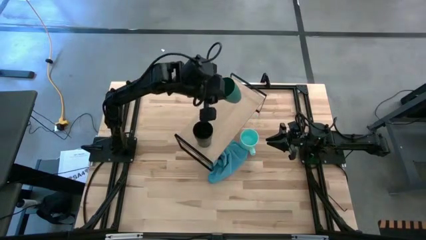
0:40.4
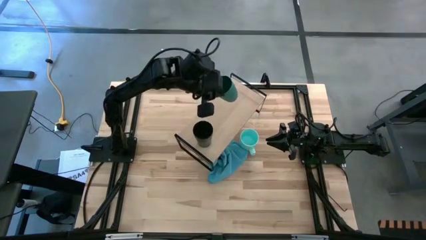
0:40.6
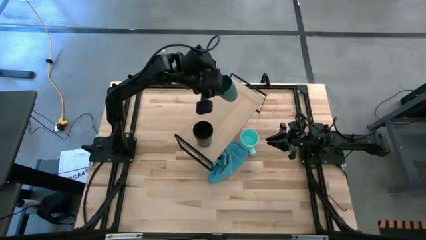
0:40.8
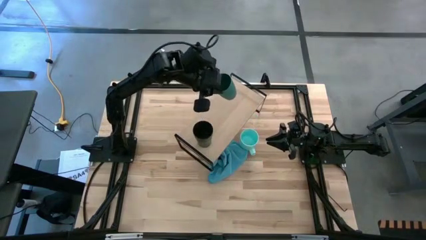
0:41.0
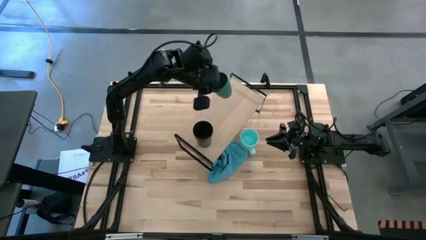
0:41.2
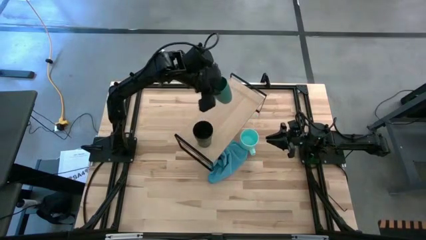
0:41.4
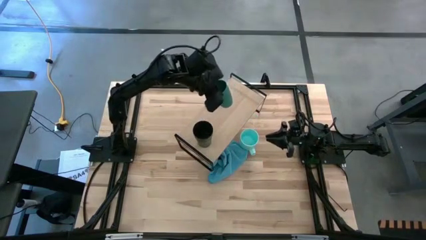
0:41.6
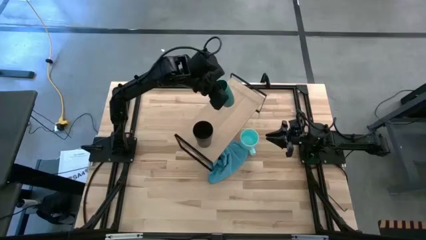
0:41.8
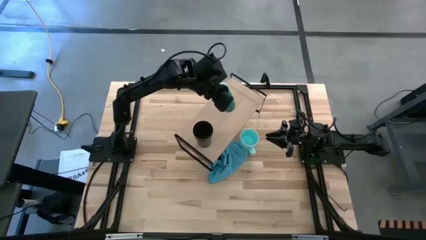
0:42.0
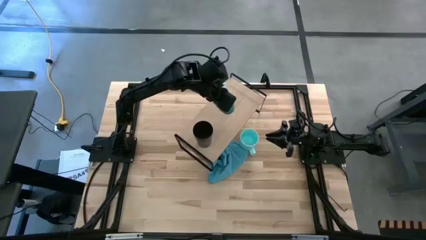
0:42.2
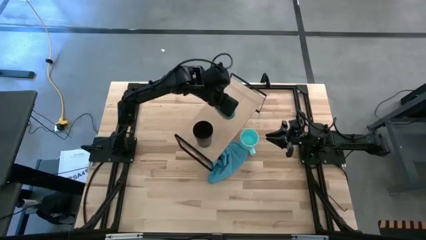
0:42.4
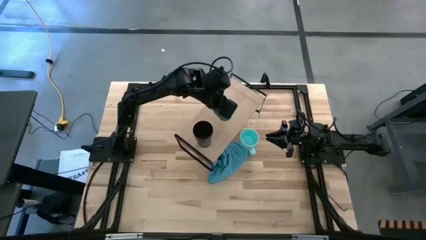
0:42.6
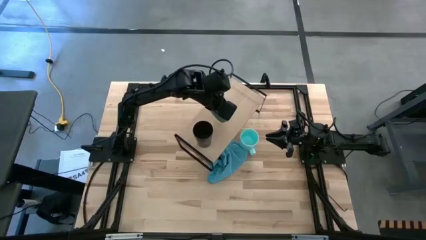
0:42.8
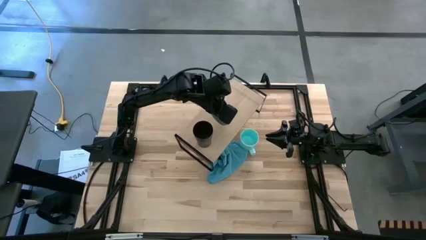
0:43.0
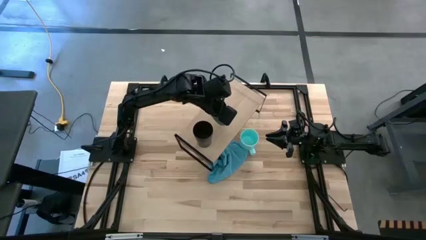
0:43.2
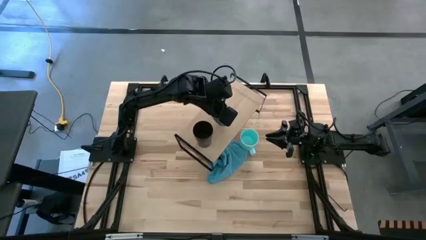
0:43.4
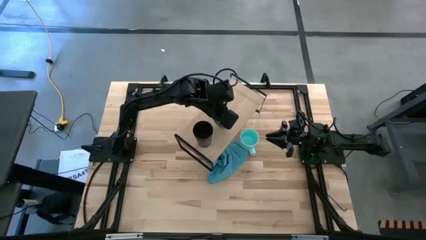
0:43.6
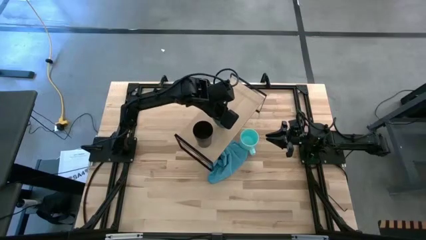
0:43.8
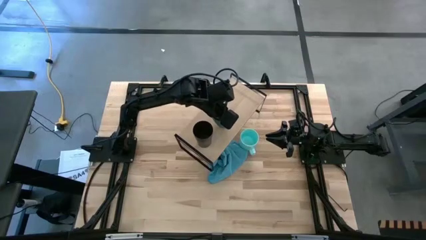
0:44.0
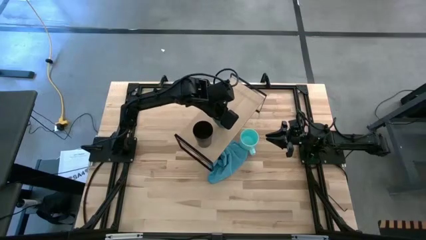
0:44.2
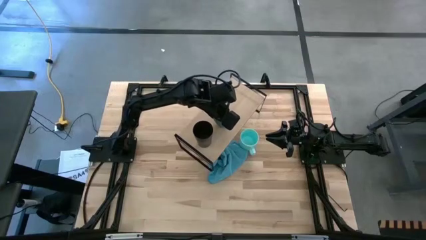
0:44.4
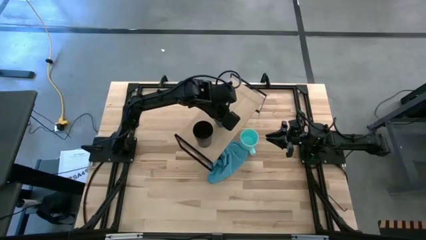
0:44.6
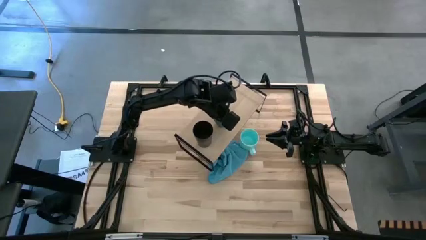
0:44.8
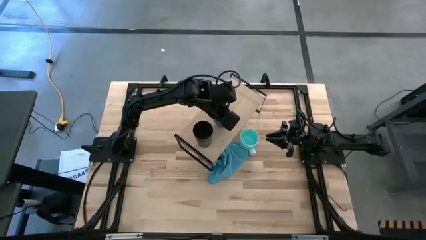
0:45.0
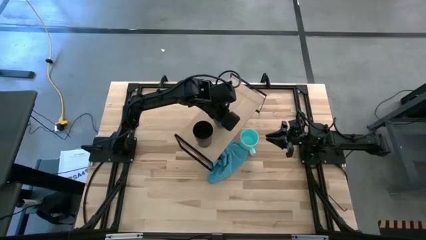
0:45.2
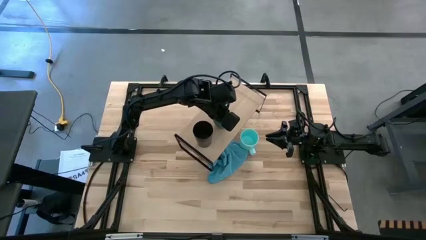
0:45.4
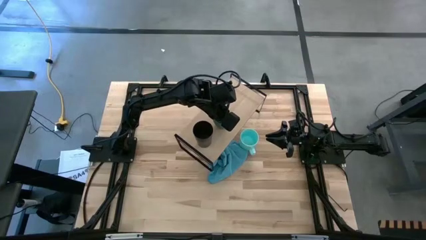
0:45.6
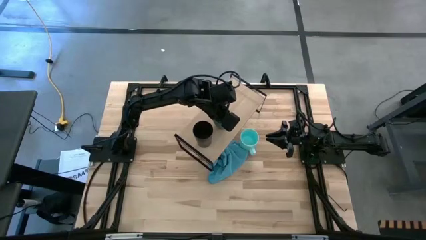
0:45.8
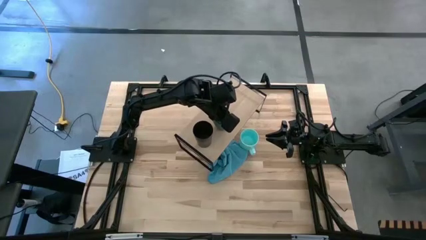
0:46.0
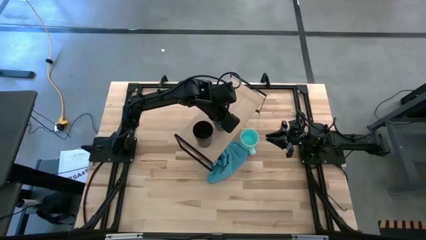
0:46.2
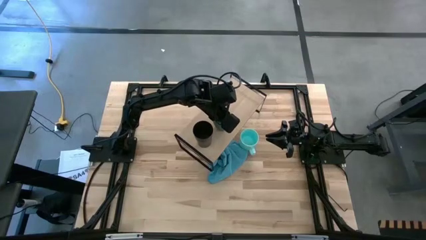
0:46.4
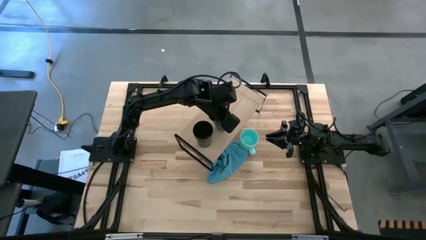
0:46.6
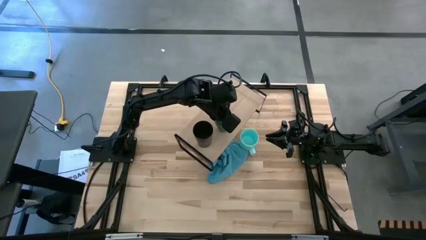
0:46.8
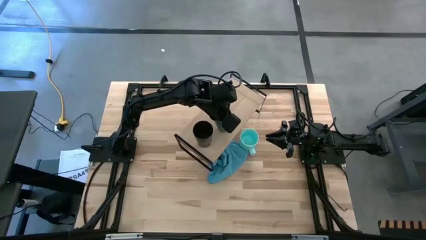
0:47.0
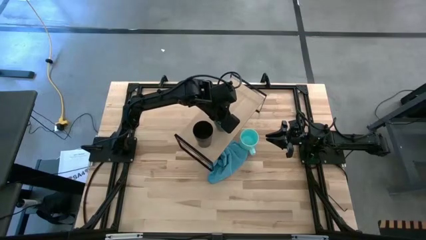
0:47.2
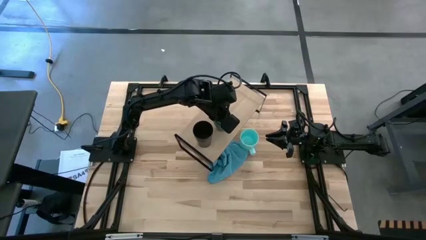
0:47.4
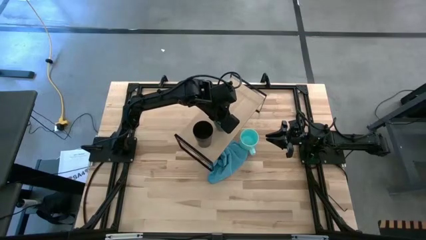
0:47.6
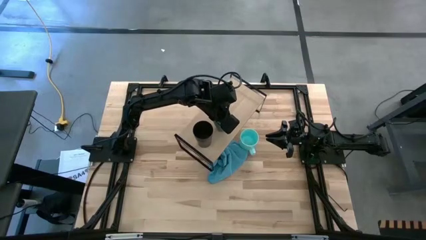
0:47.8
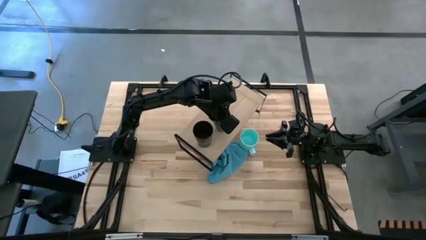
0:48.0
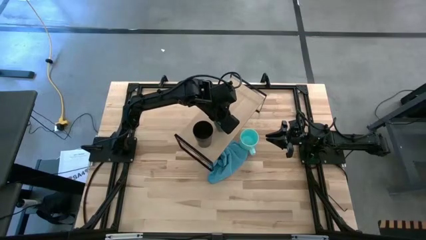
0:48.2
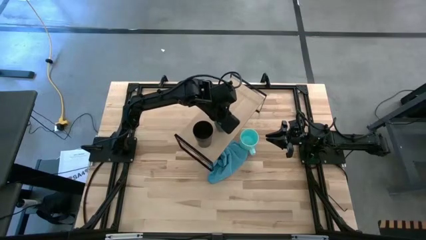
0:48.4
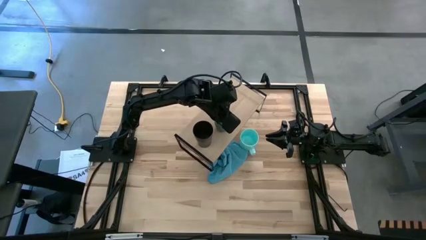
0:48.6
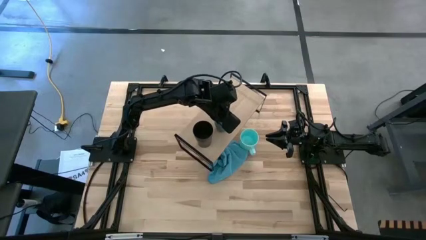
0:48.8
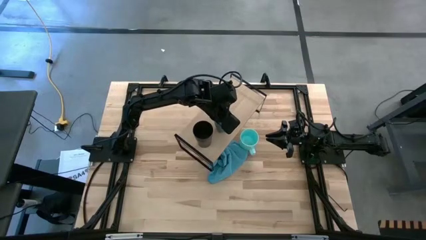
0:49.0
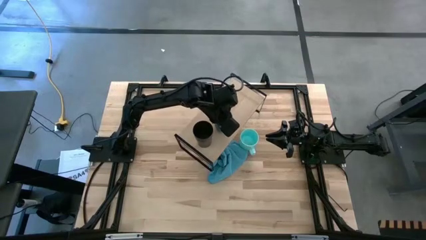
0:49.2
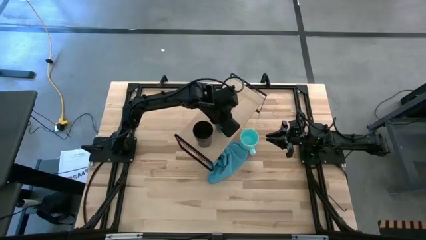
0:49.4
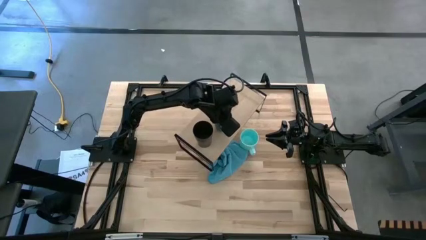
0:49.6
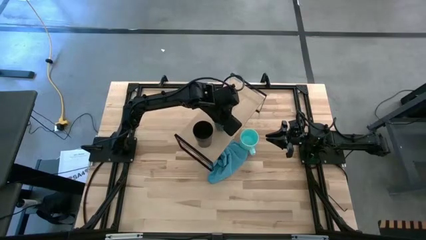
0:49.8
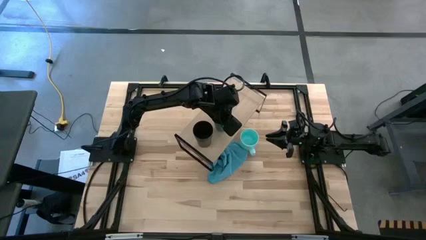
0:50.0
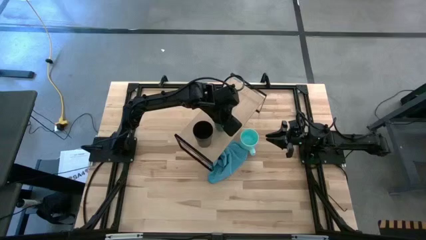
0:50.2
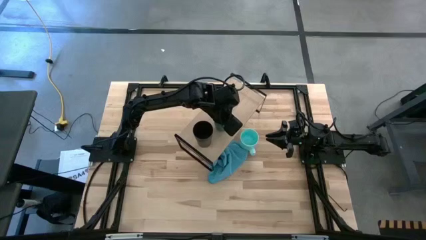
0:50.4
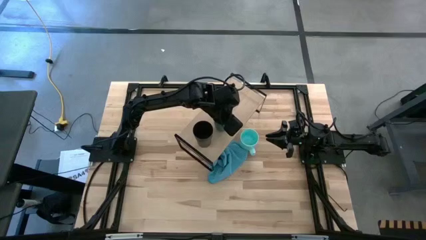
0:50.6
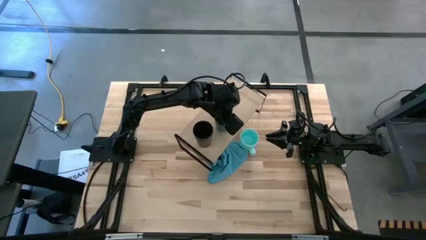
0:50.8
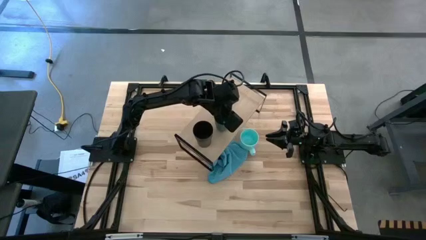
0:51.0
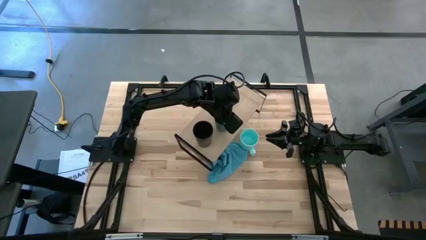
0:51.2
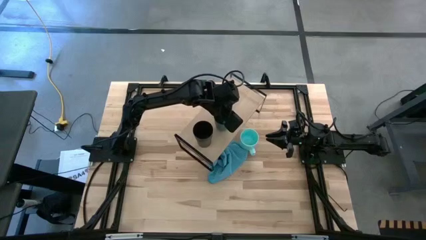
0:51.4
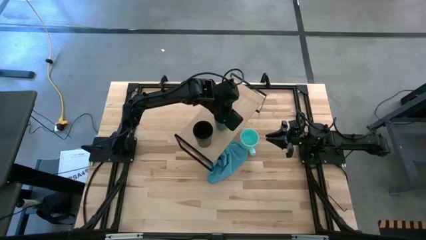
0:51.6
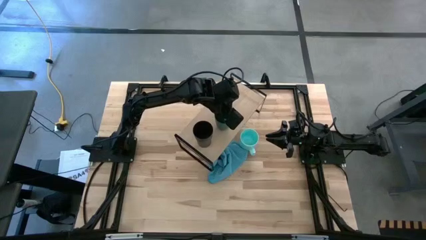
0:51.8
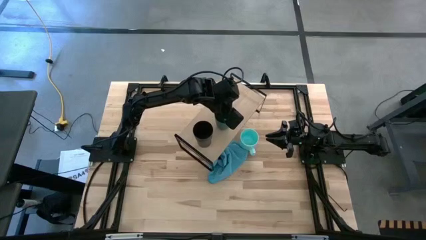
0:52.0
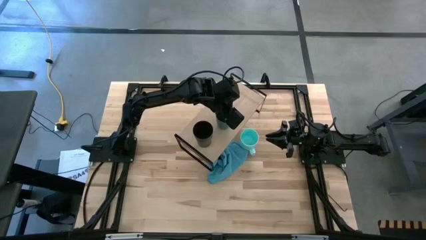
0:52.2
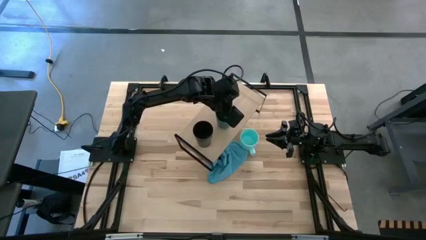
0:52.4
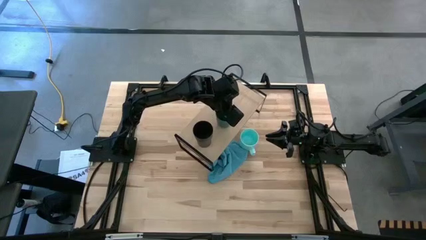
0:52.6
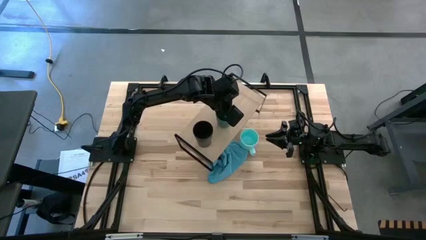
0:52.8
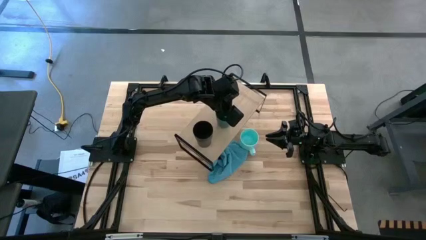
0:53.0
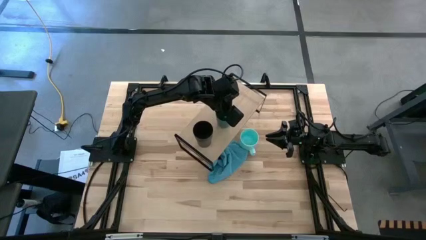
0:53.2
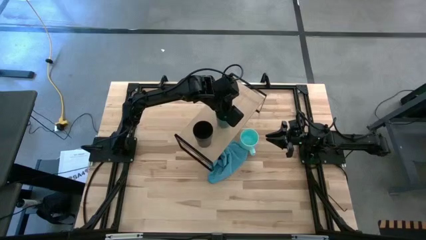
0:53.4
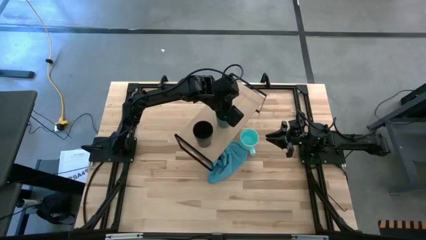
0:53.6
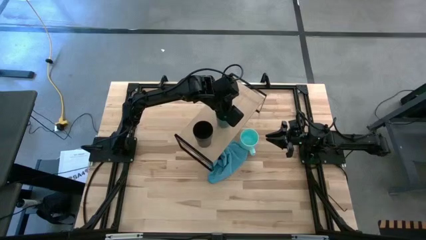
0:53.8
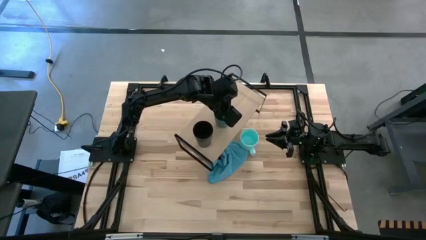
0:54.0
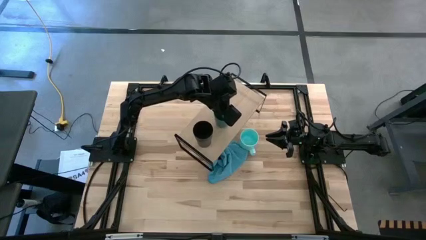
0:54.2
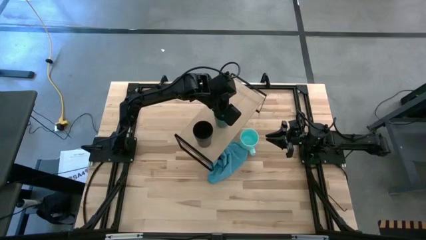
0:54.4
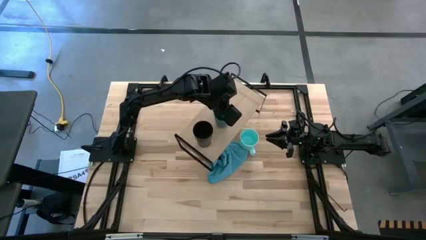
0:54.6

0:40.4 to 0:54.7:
Task: Stack small to large cups/mugs on shelf
Put the green cup on the shelf

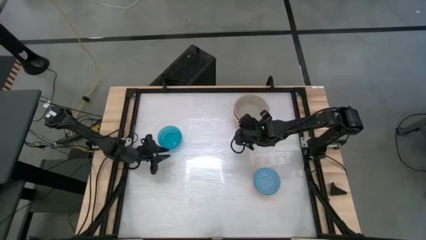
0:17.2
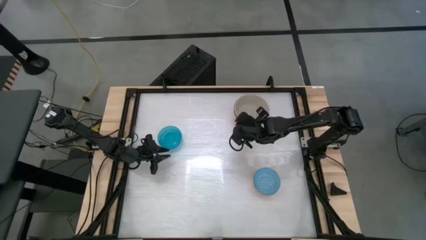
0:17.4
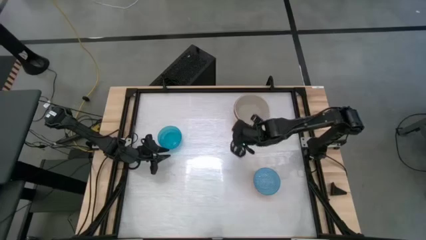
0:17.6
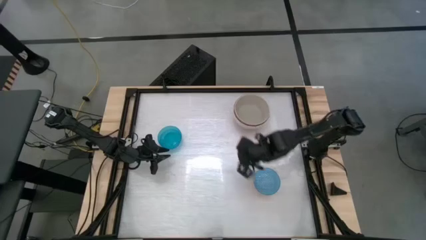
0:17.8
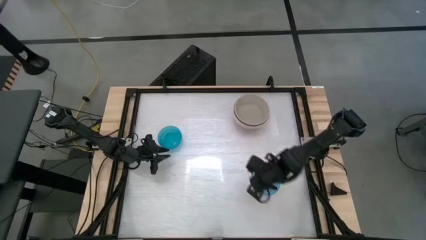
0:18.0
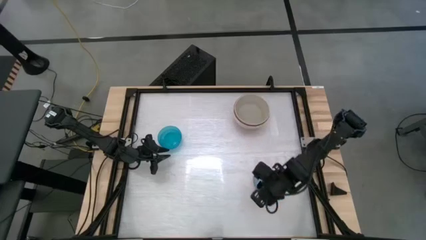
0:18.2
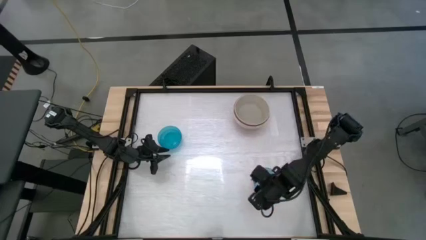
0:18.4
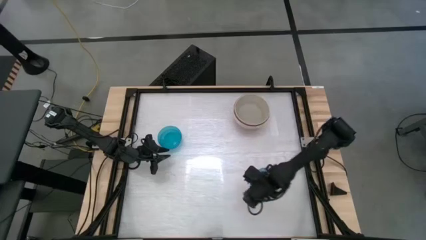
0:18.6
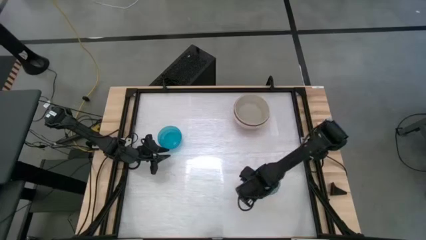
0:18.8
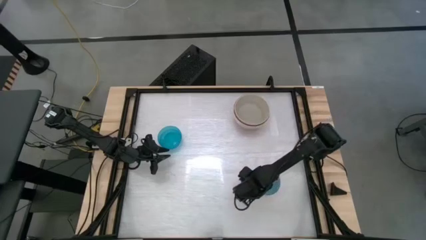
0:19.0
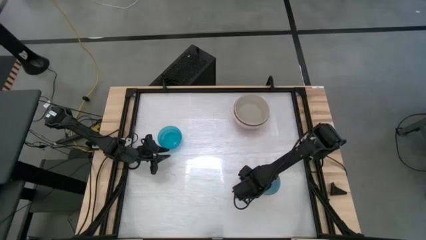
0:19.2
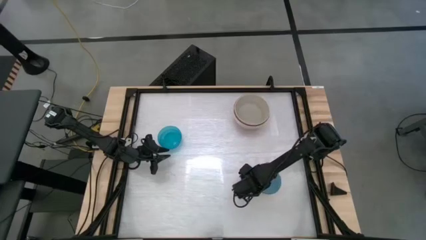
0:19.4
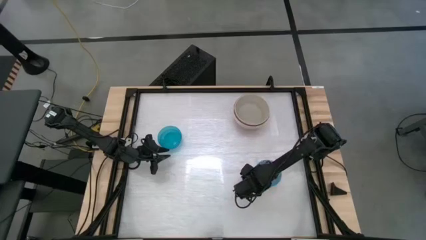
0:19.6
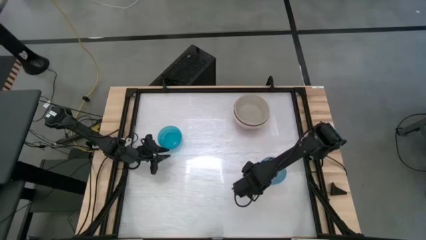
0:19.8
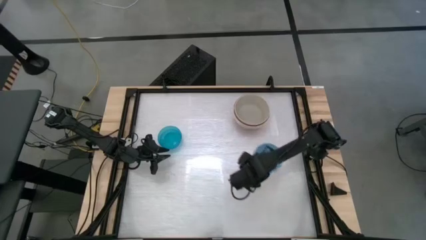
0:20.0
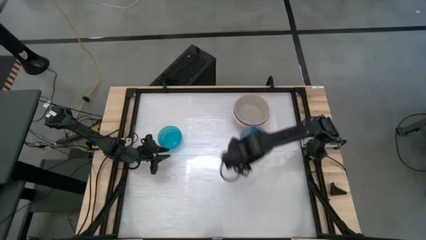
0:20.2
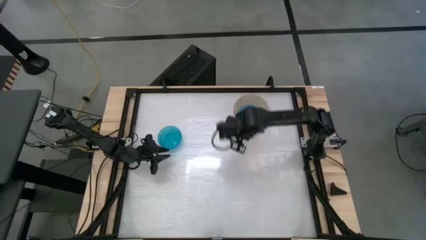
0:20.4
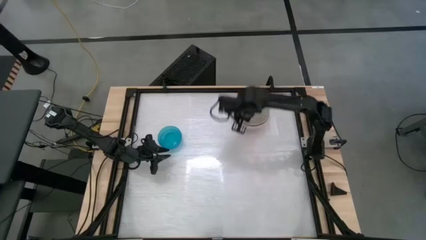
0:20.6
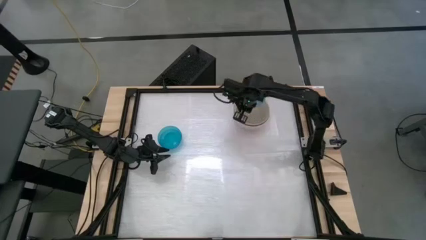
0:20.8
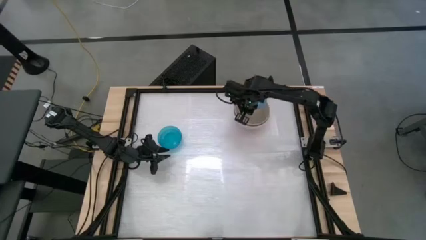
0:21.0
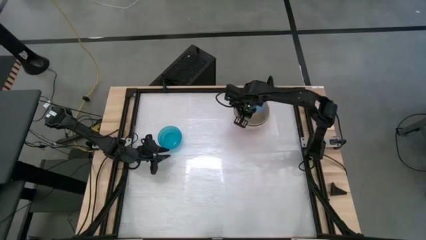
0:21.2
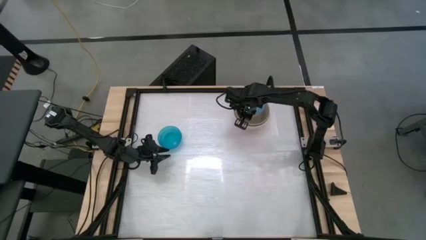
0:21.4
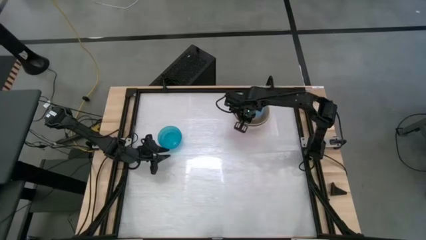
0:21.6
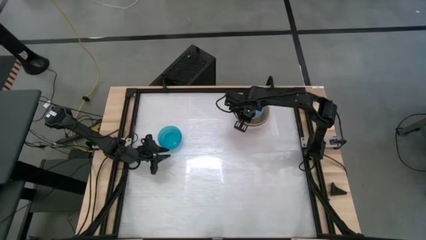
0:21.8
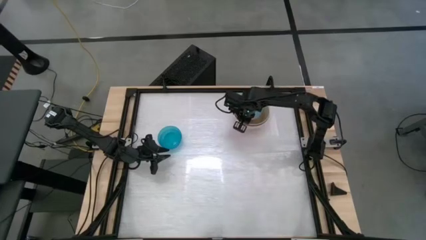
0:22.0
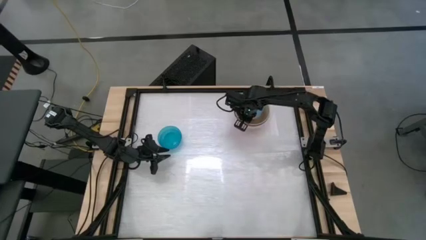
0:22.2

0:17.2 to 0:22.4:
Task: Nest bowls inside each other by size order
Stack the blue bowl on top of the gray bowl
